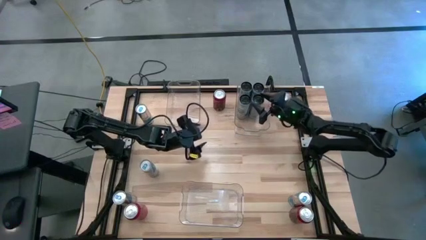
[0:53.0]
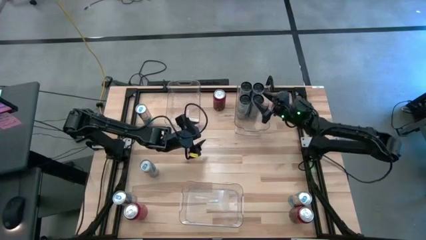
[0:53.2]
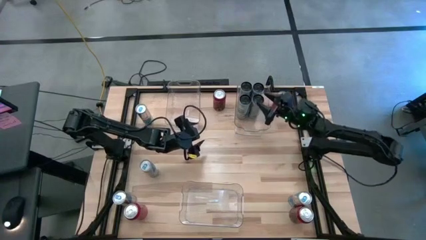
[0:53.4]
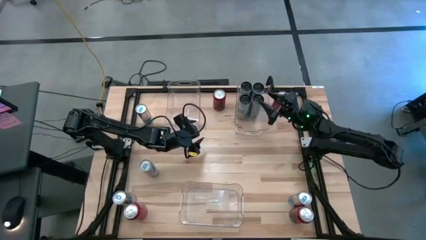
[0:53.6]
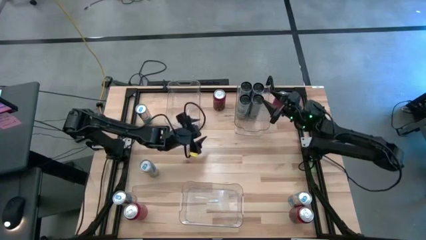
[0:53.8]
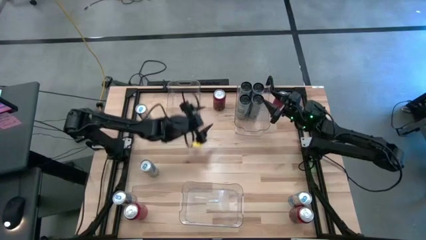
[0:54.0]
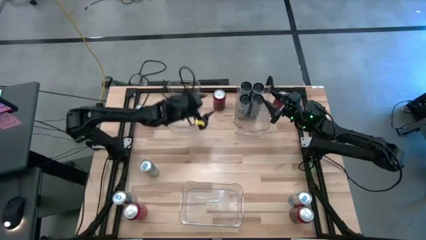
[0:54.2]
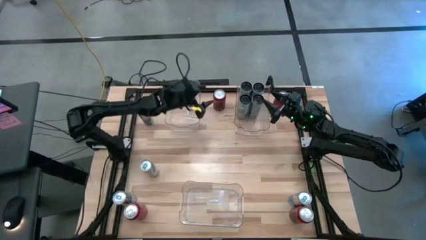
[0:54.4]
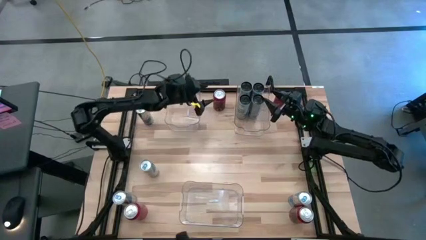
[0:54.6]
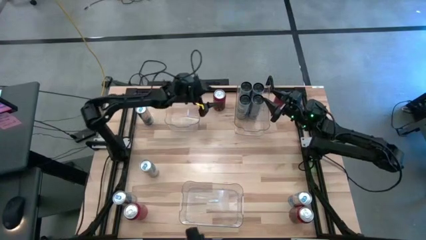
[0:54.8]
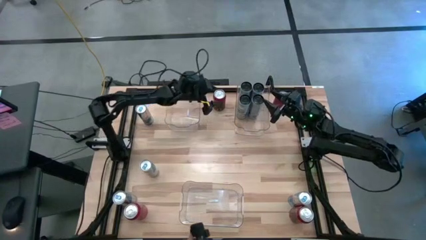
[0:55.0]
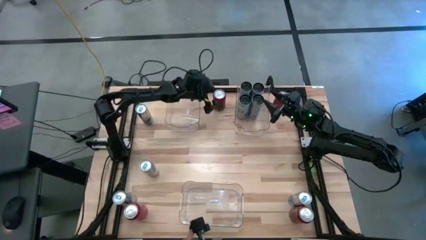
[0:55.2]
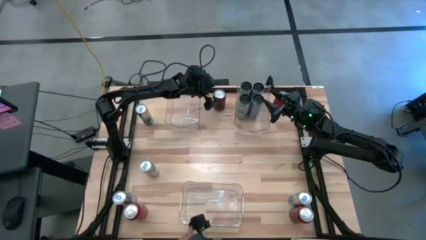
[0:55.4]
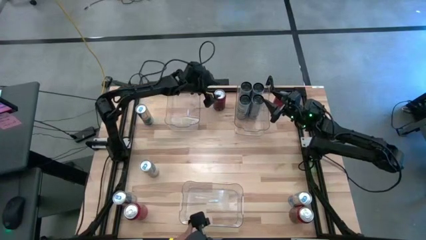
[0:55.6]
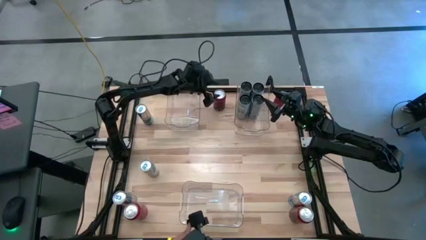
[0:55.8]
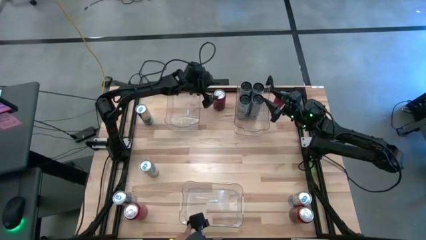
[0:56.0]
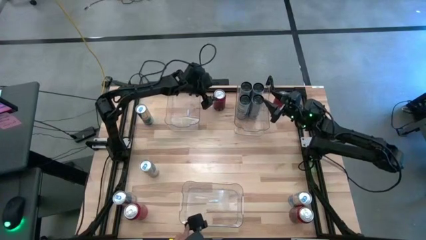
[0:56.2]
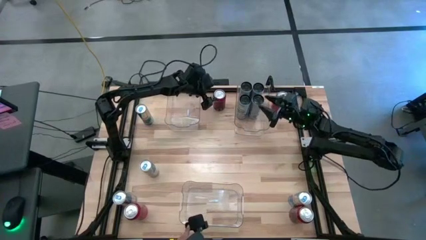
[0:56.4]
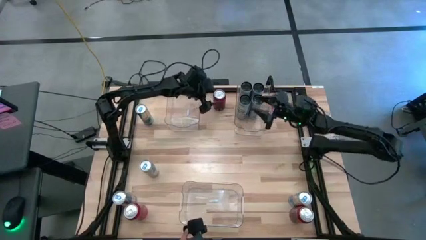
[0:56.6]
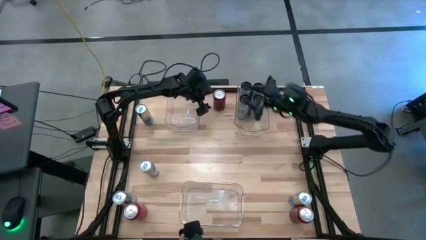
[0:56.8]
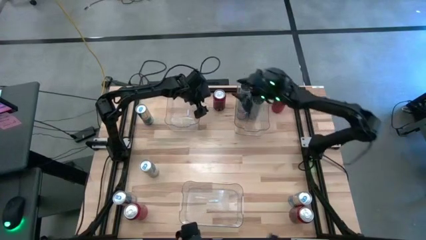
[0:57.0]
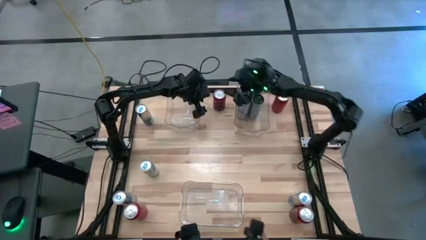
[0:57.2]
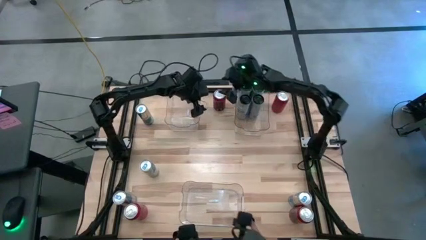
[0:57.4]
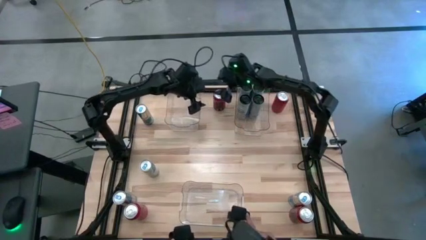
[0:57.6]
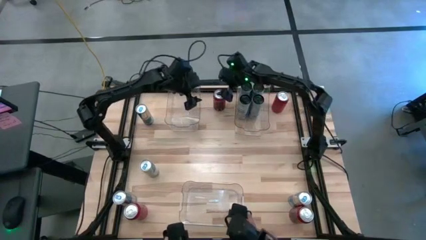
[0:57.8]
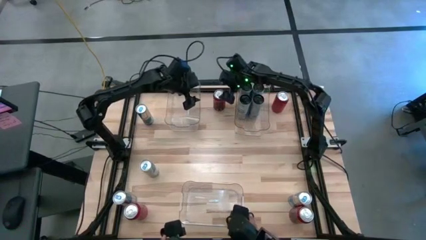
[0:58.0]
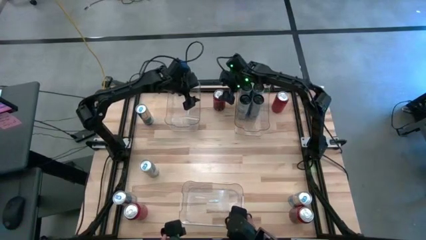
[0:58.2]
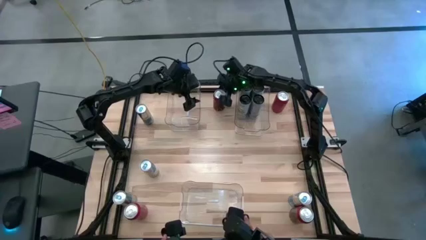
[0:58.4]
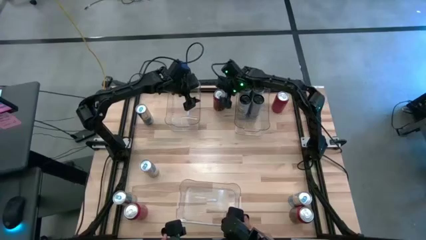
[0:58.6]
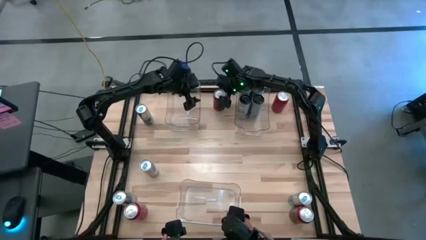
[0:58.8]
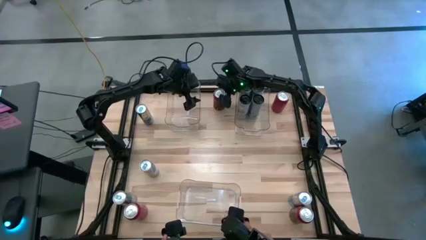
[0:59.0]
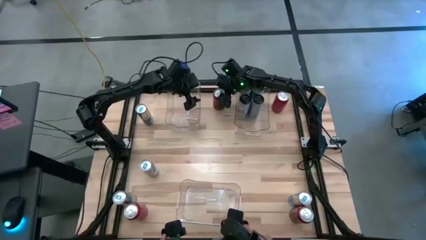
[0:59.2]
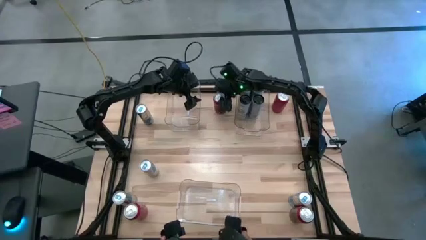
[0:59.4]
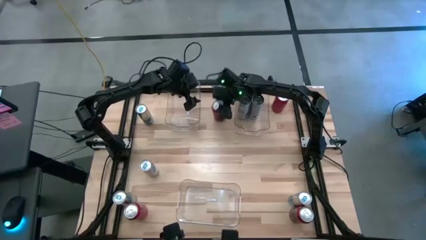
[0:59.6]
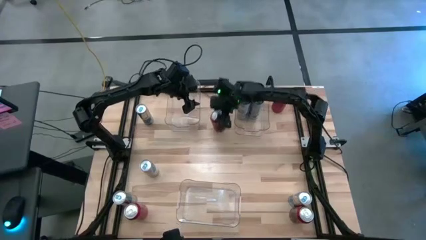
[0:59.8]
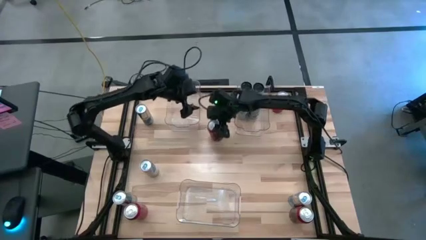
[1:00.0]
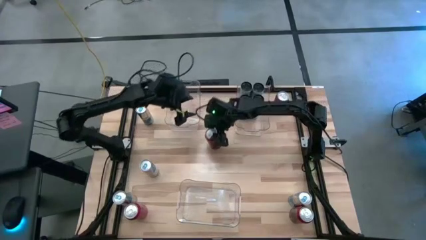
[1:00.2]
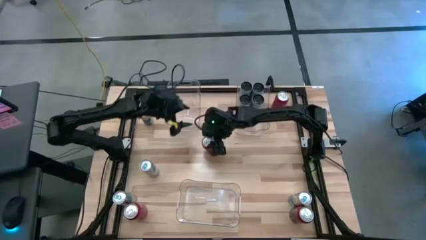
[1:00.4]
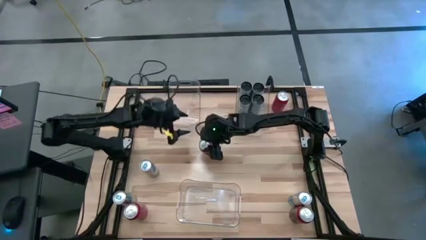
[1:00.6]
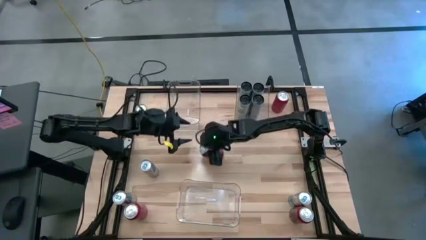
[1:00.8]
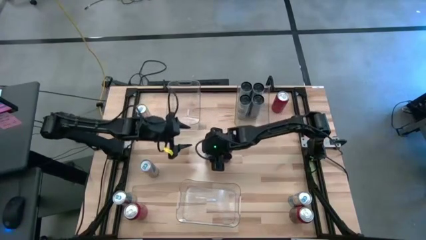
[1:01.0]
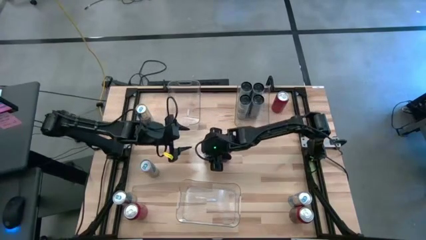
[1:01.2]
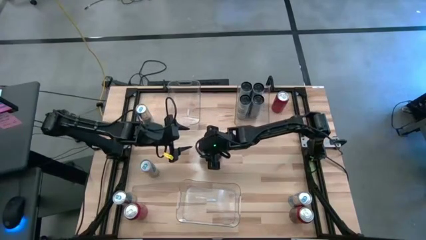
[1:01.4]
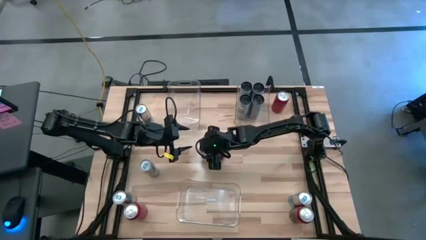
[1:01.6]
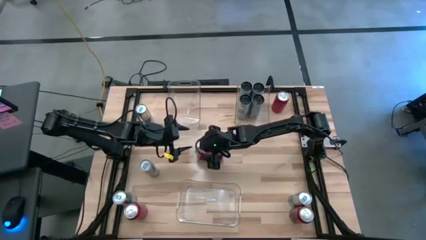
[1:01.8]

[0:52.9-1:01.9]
Task: Sort soda cans
Put the top center red soda can into the top left transparent bin

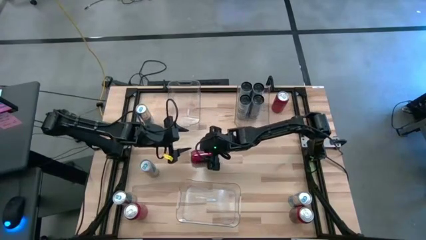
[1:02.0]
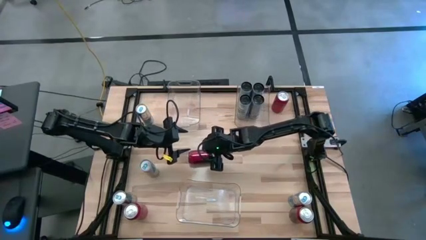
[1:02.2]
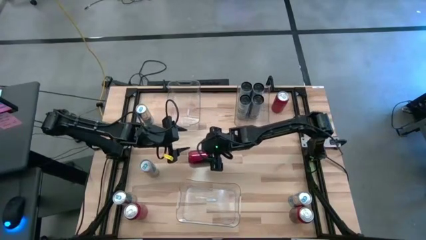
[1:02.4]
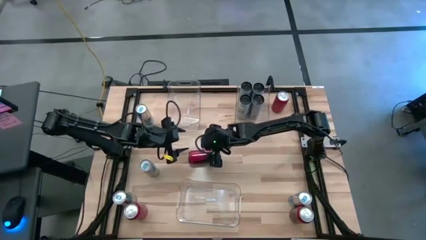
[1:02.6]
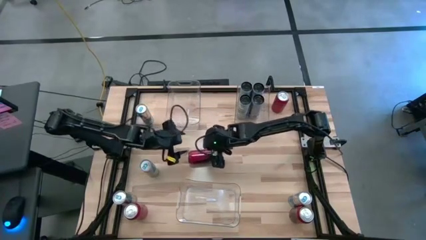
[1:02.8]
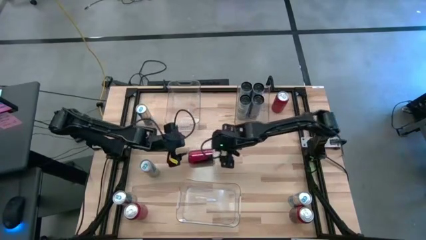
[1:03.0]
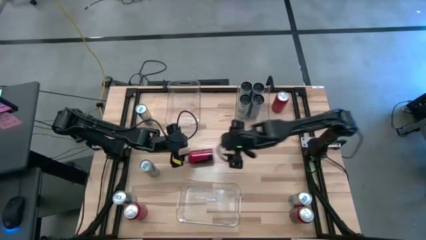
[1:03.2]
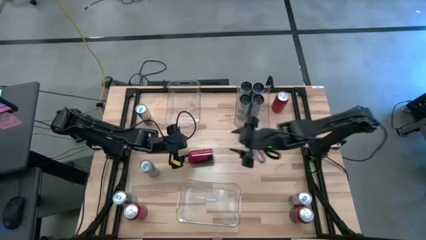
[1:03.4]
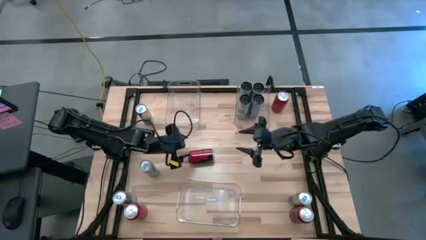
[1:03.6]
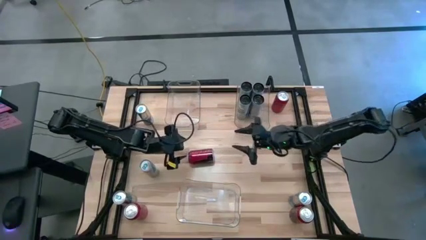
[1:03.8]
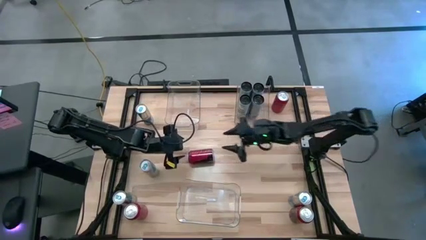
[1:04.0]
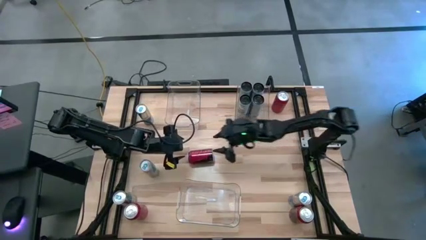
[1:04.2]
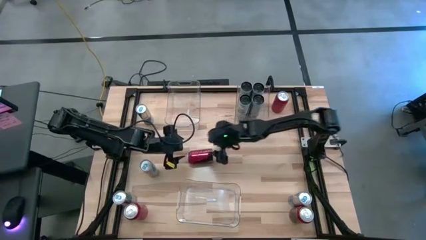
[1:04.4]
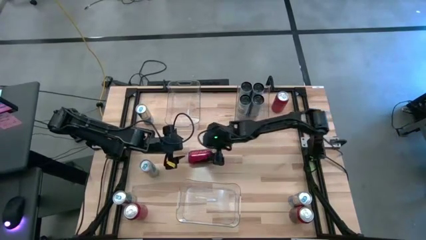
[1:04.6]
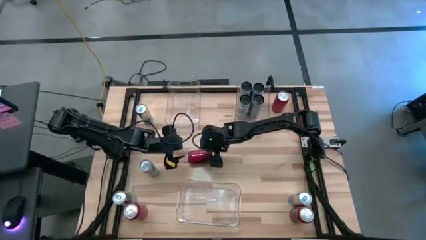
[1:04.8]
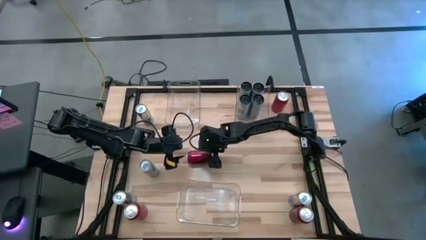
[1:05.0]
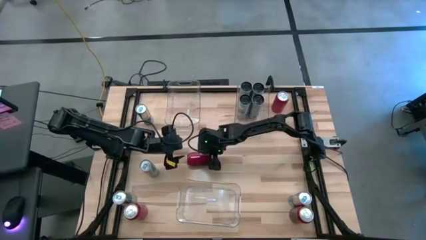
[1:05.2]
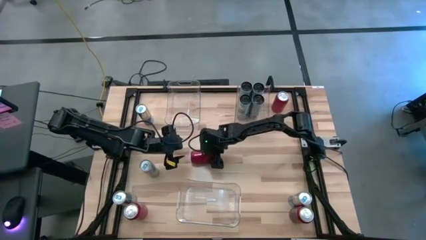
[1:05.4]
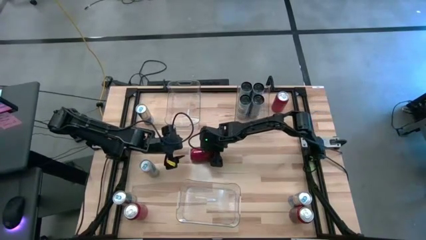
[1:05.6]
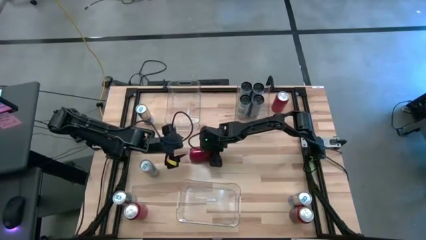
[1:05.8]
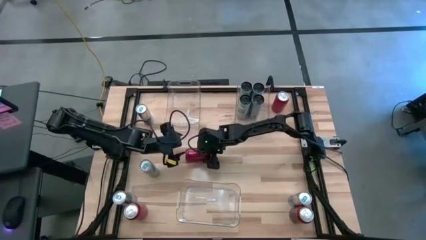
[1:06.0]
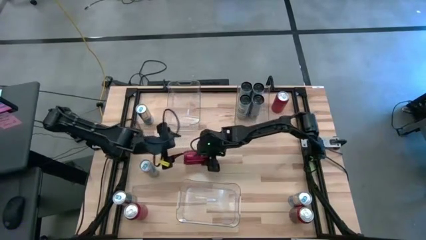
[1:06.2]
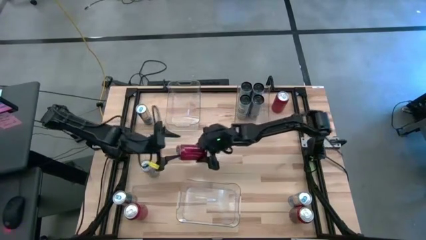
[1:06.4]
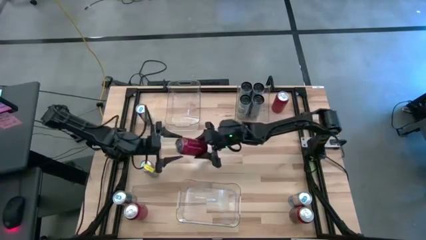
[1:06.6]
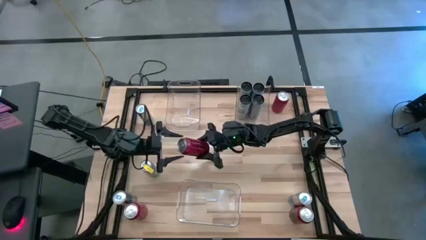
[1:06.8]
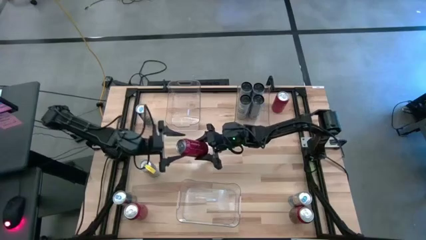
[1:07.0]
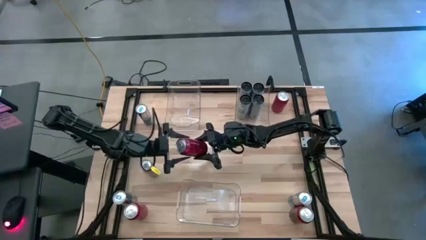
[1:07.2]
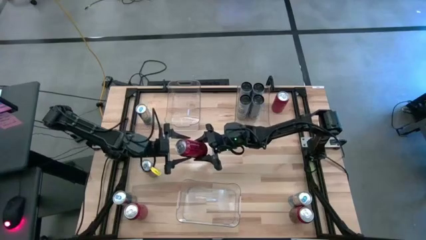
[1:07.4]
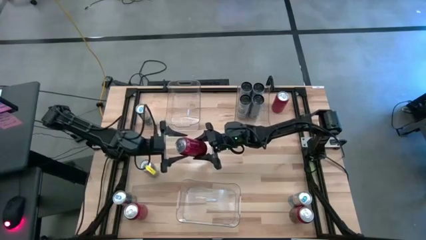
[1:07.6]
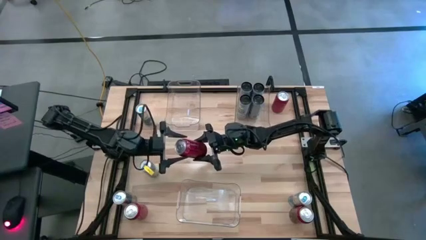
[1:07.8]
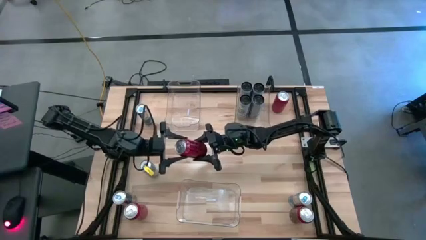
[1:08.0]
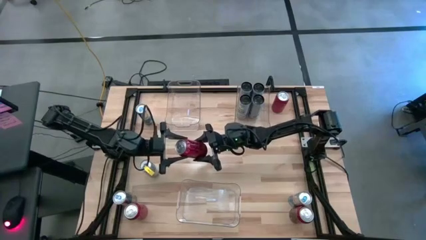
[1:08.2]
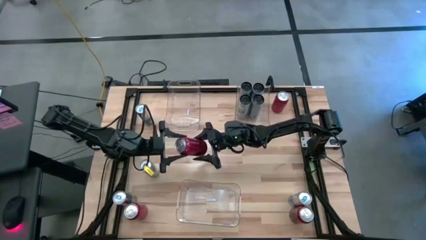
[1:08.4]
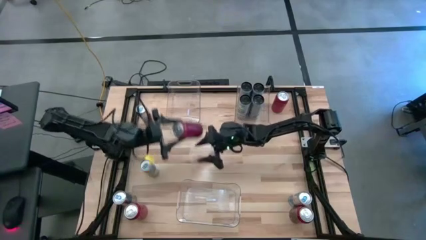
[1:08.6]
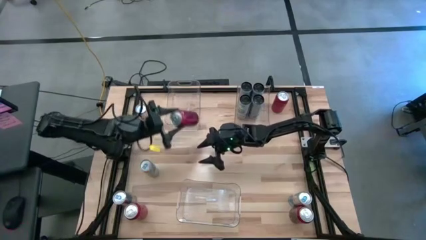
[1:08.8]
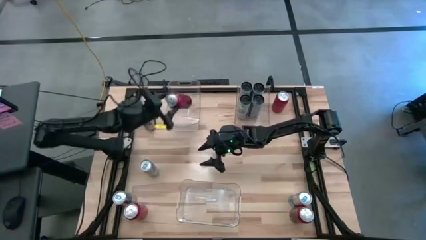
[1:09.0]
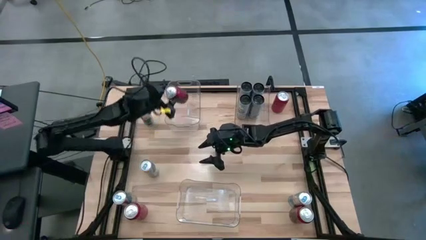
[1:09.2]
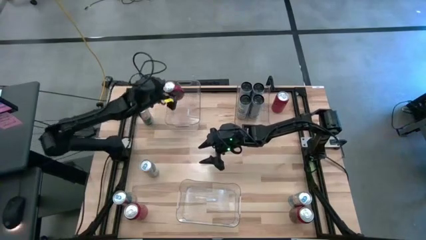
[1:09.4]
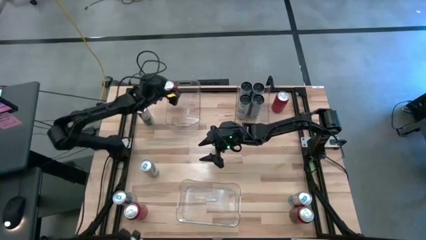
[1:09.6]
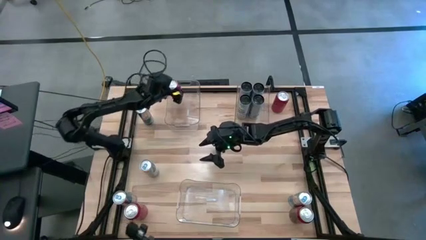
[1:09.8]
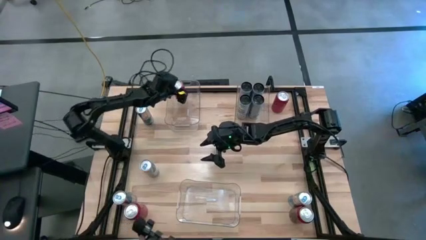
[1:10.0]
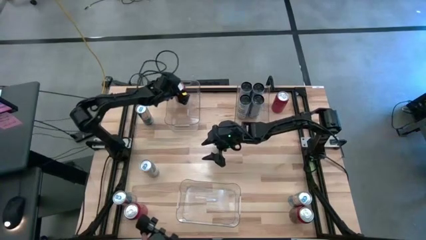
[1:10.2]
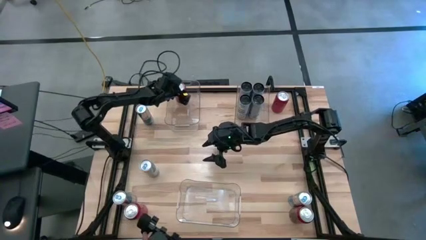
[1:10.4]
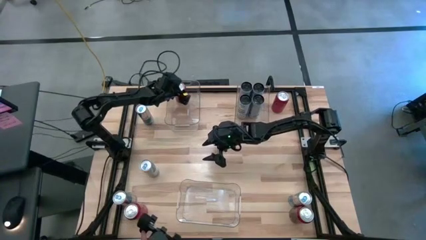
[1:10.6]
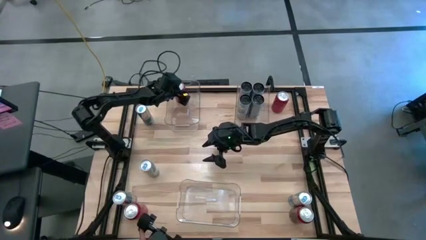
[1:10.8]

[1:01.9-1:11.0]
Put the top center red soda can into the top left transparent bin
